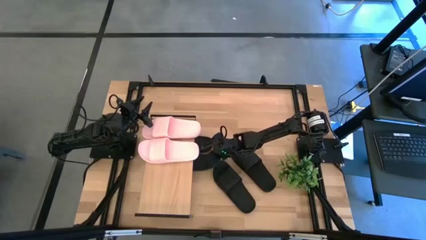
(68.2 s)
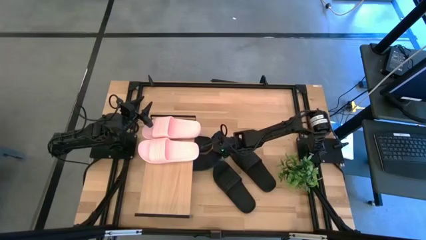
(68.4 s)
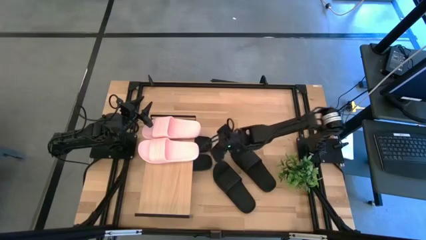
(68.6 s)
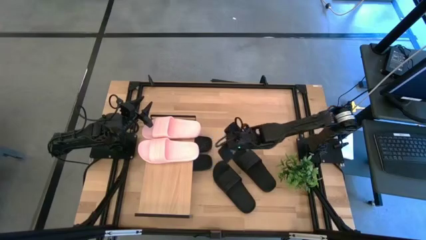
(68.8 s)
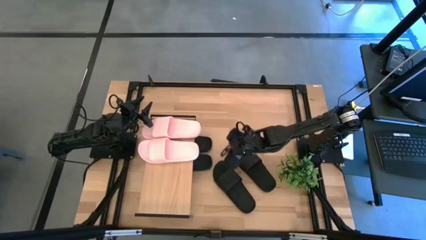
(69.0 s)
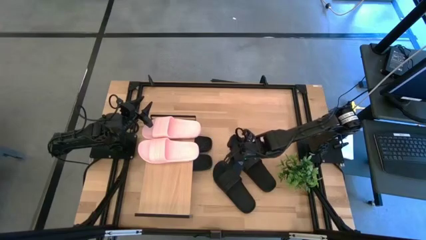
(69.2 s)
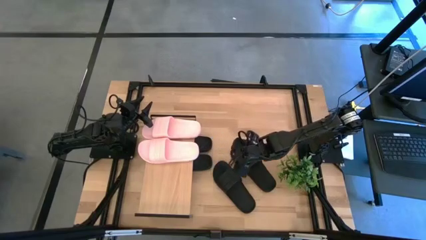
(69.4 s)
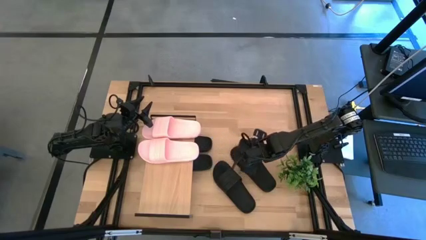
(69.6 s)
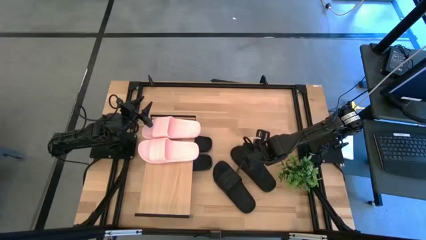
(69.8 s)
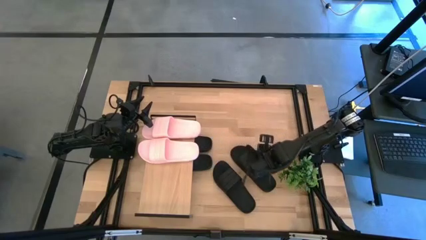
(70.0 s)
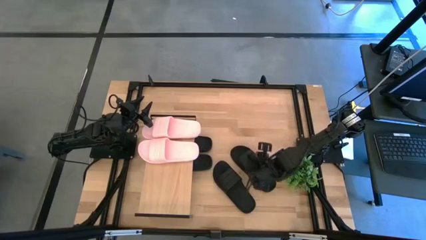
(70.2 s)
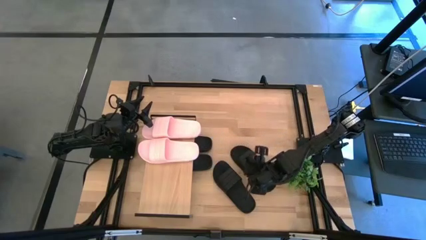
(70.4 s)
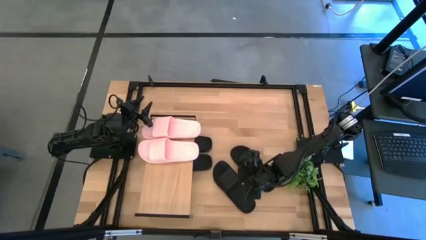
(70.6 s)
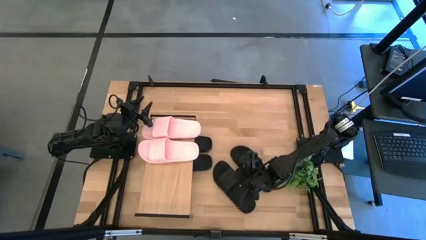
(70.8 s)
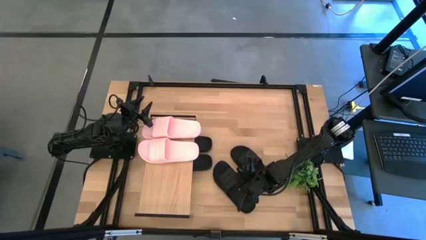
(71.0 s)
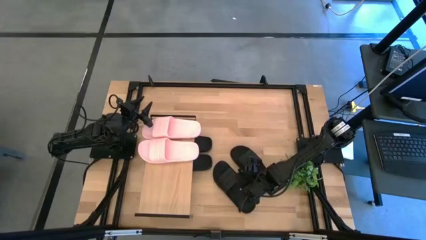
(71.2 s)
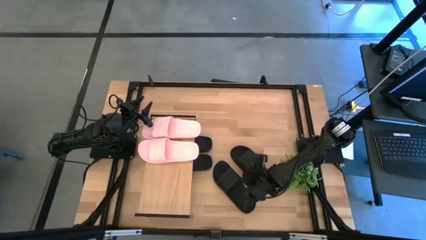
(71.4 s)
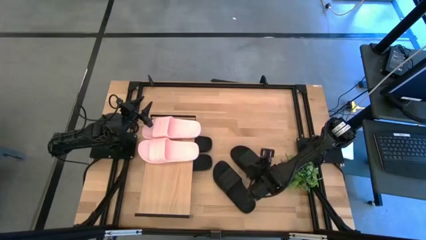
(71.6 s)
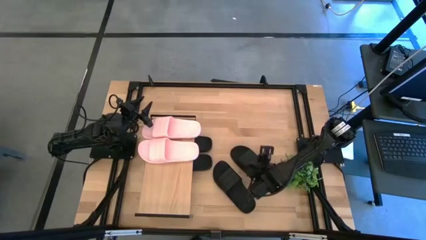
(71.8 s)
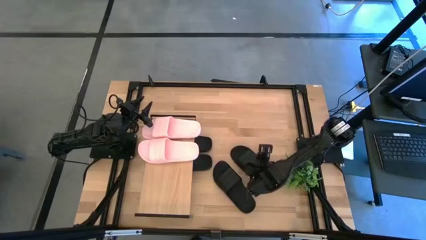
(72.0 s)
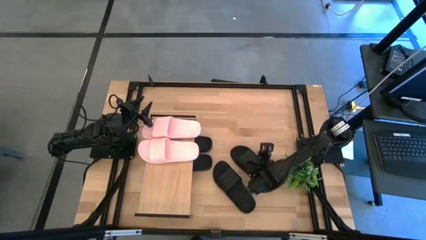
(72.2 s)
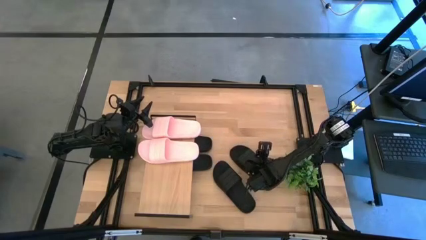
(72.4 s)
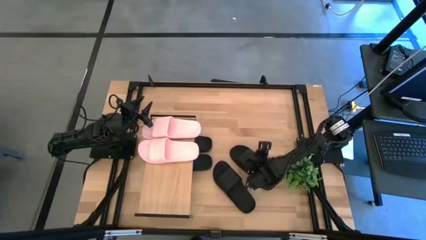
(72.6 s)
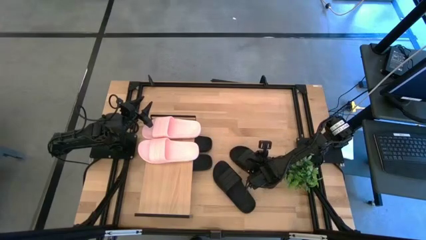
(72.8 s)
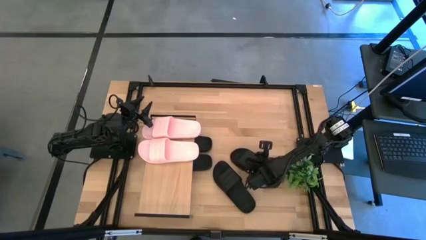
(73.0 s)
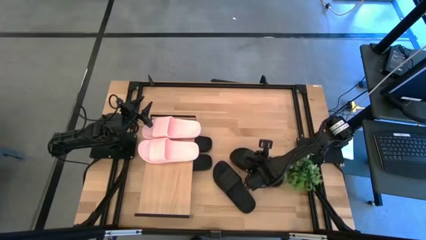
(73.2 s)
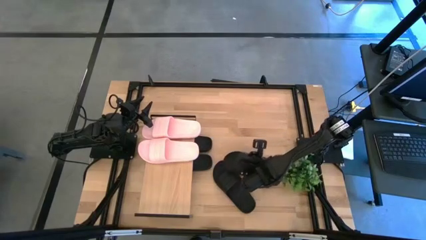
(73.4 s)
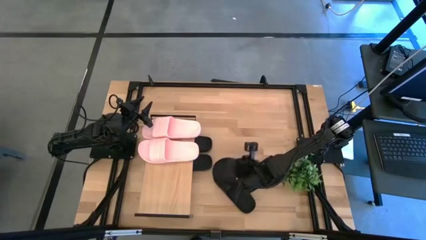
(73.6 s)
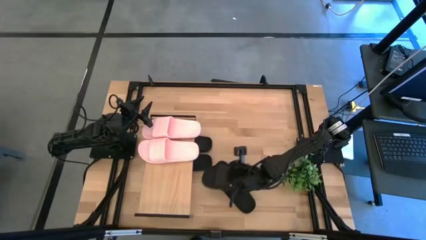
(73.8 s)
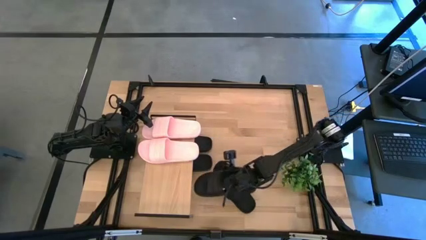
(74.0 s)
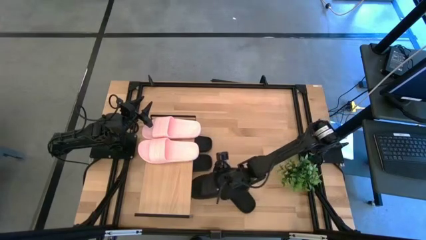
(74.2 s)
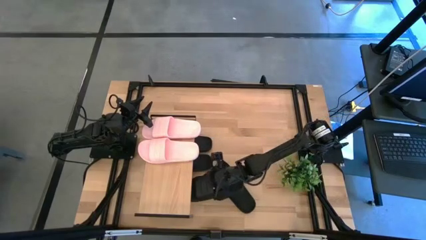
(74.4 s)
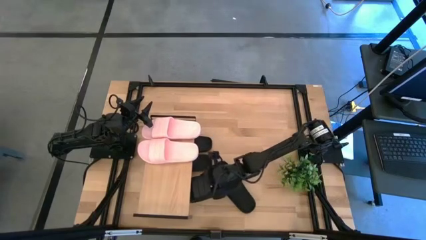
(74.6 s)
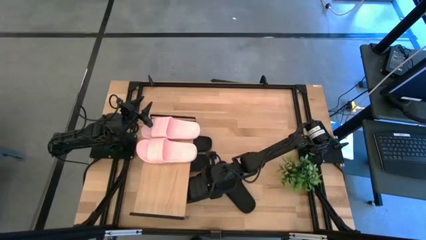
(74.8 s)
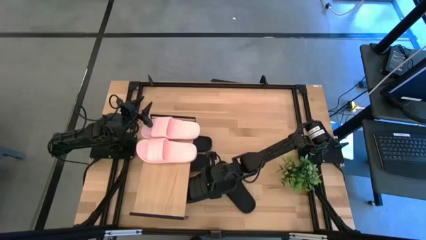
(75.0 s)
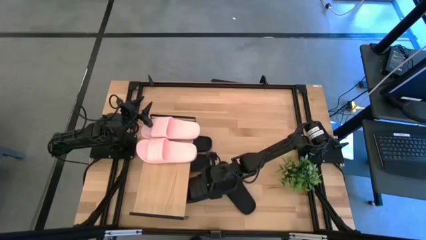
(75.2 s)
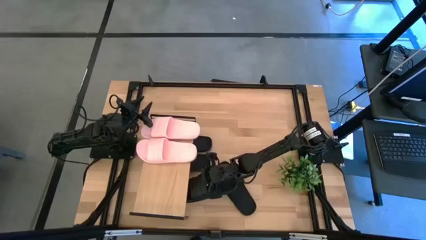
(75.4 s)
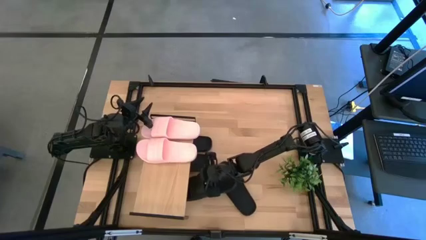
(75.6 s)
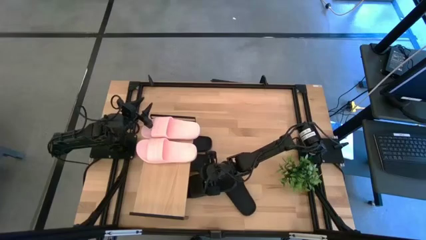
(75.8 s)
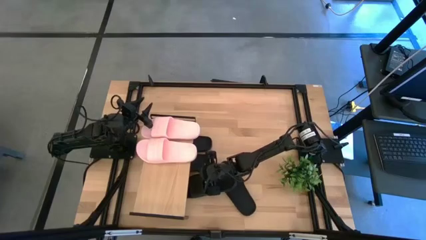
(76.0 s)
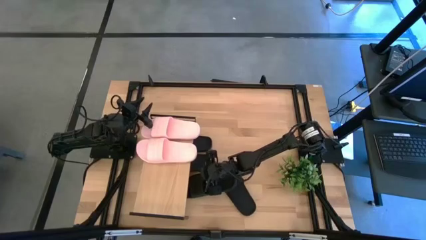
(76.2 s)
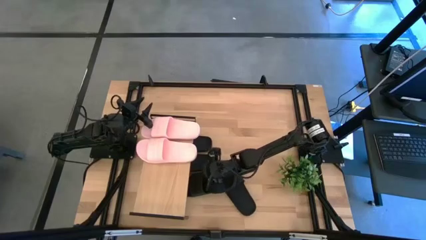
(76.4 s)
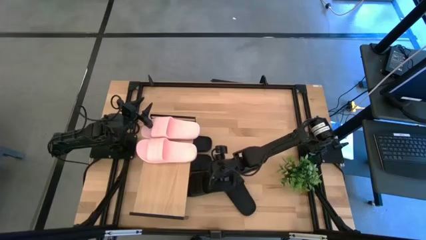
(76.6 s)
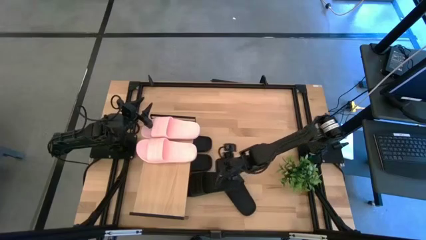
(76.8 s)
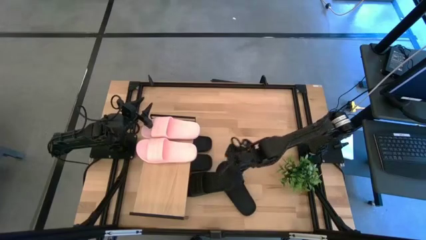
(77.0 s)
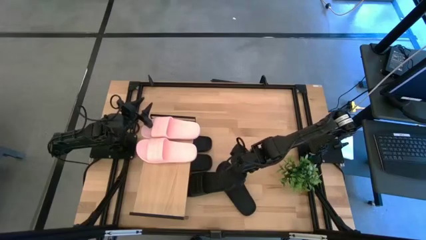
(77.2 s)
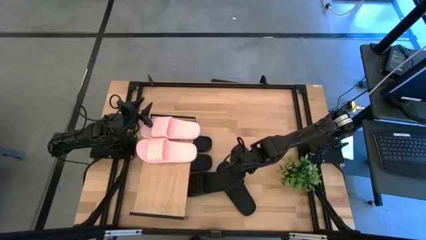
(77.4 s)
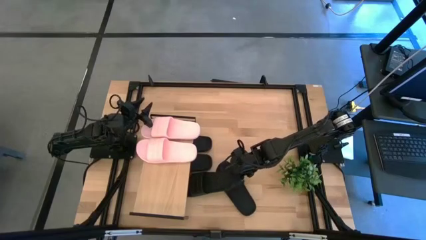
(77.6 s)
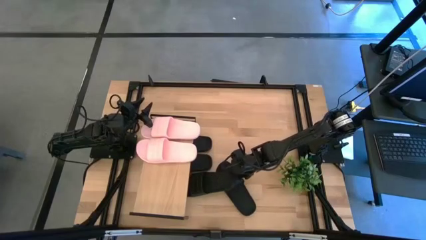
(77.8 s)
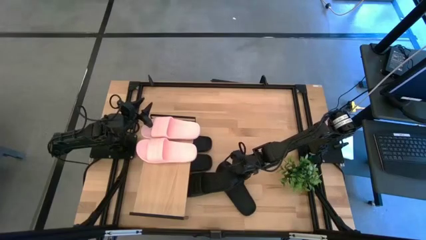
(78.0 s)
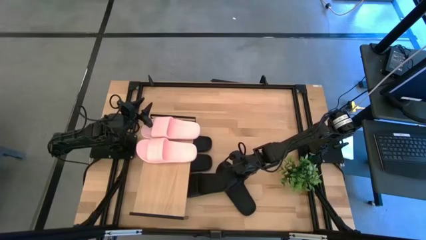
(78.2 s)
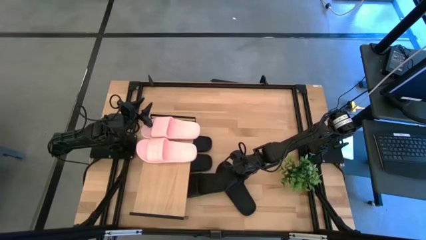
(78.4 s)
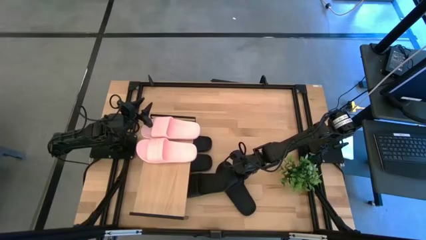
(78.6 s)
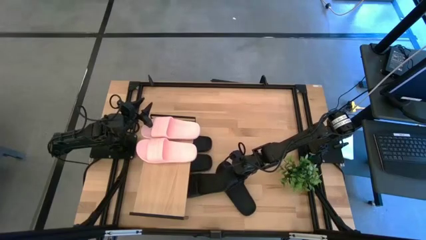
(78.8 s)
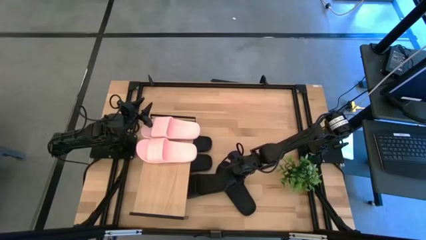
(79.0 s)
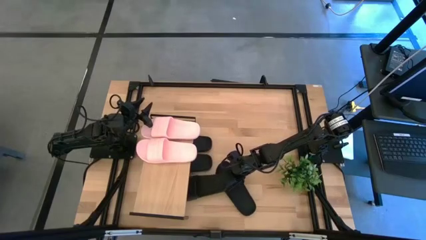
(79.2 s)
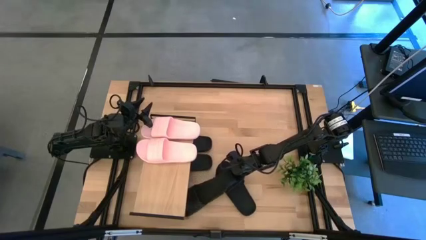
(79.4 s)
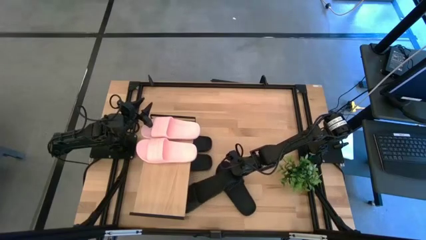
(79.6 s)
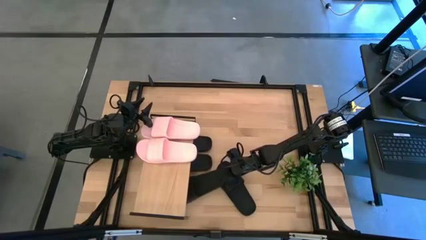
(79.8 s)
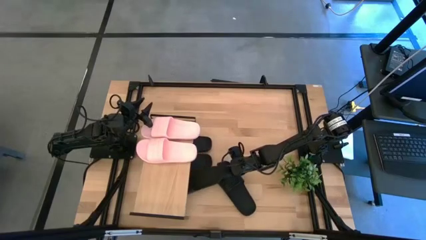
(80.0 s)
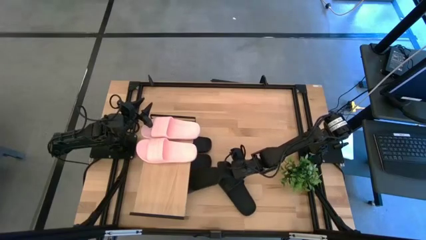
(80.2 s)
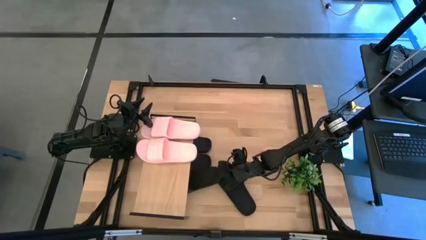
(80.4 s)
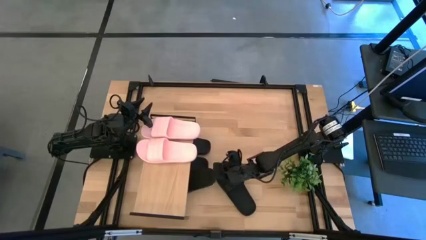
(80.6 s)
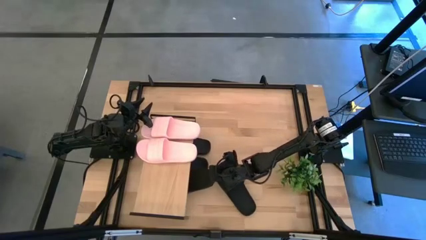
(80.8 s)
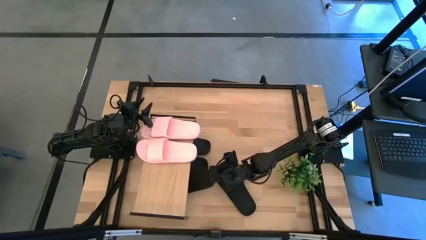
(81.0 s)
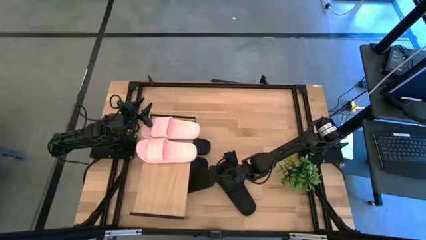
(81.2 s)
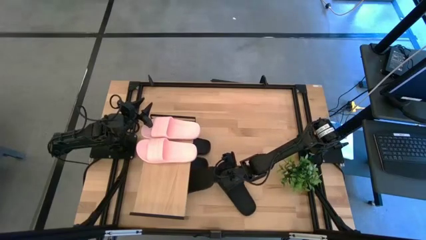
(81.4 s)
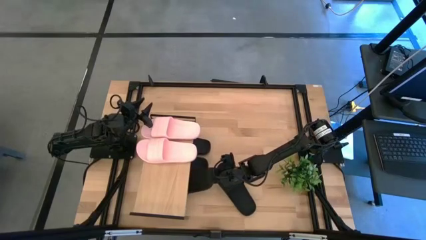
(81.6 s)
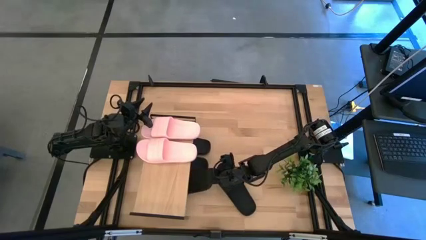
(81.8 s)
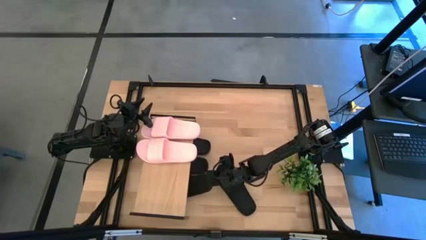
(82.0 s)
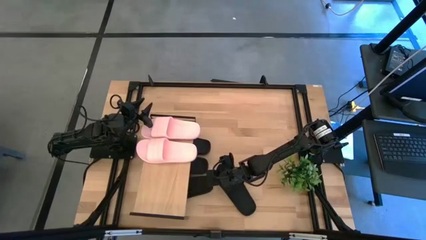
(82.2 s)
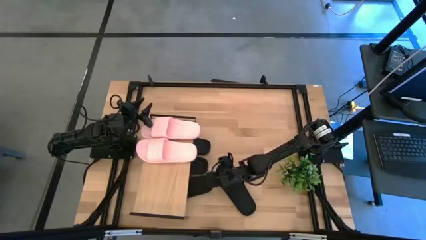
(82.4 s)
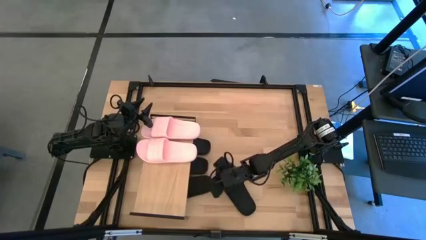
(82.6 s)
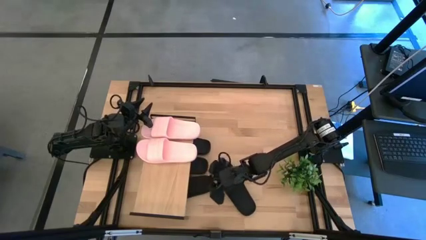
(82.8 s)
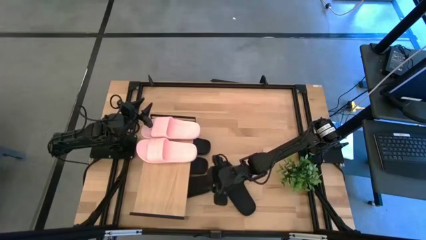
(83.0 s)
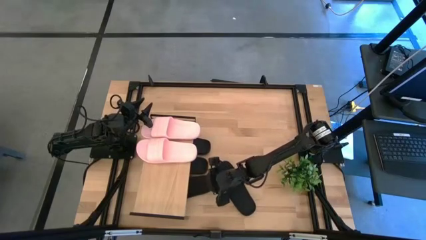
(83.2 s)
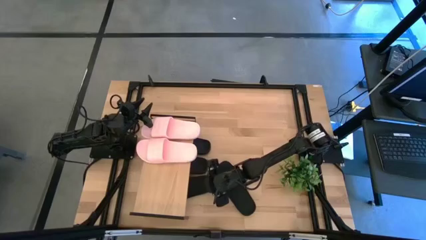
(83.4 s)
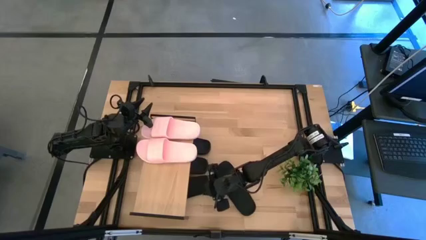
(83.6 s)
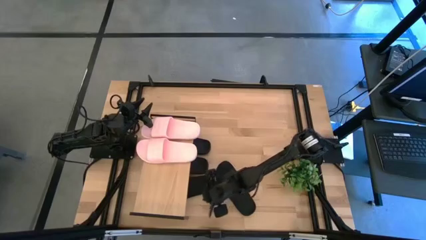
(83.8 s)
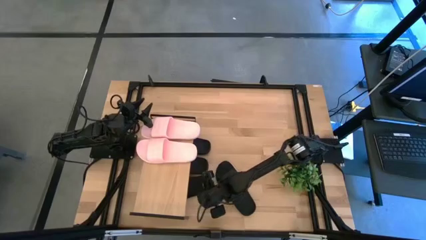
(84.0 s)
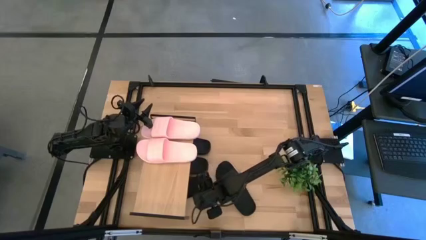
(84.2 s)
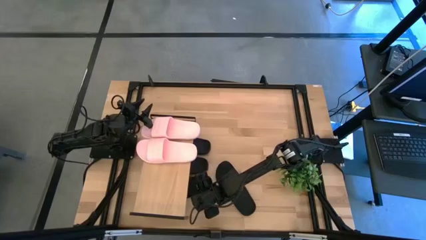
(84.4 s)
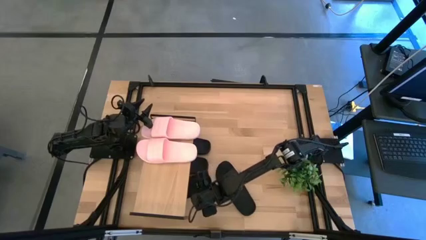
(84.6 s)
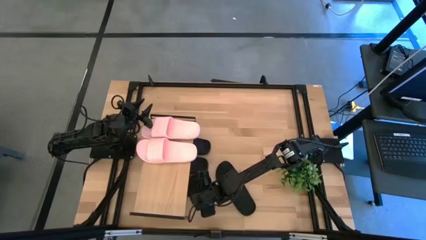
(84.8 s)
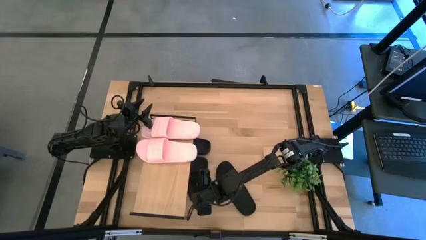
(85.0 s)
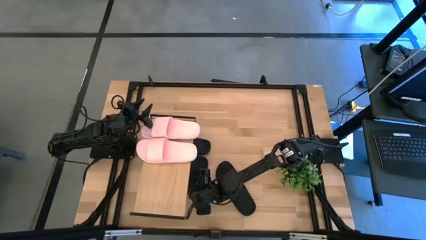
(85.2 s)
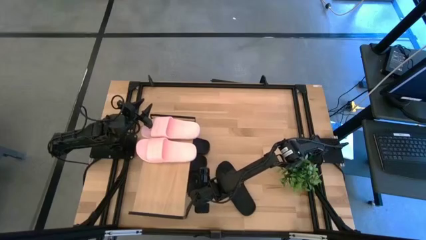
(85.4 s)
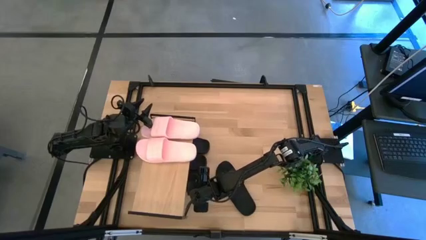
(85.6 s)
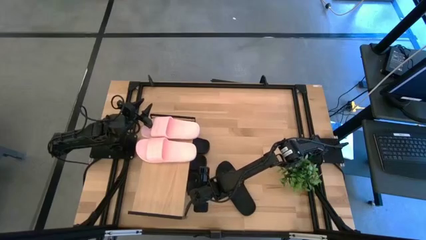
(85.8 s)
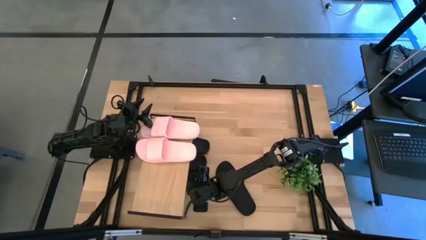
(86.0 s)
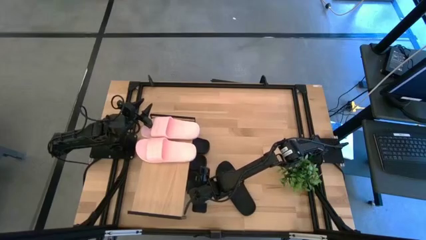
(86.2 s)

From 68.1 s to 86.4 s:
Task: Pick and place slides into the shelf
Put the black slipper under the shelf
